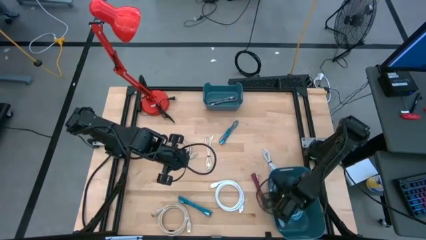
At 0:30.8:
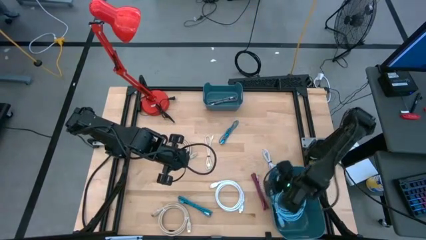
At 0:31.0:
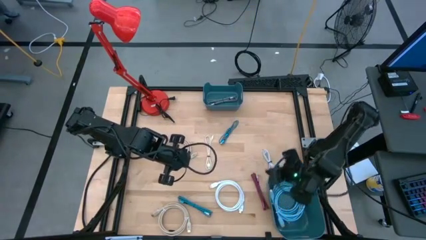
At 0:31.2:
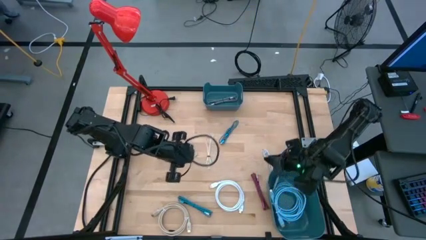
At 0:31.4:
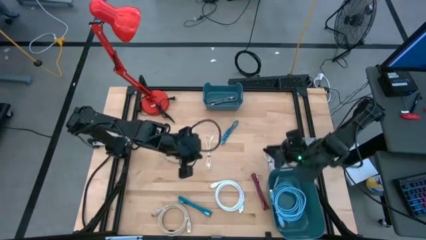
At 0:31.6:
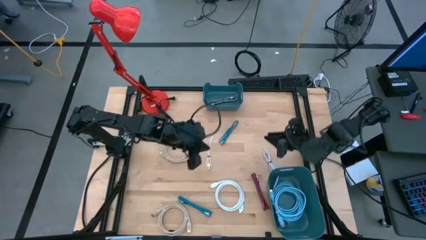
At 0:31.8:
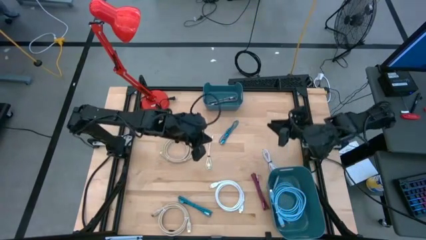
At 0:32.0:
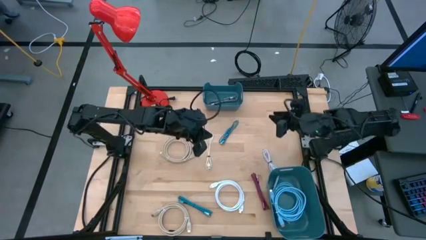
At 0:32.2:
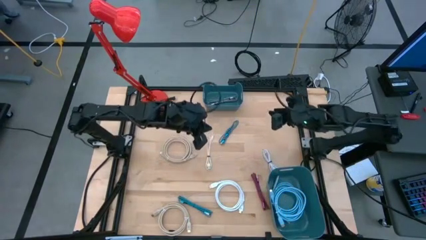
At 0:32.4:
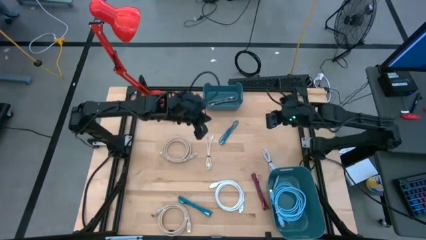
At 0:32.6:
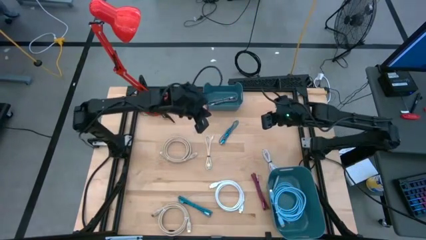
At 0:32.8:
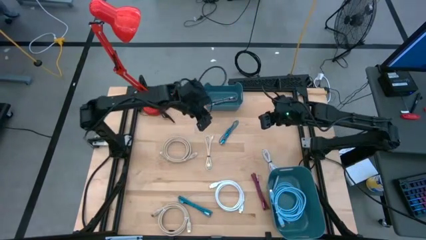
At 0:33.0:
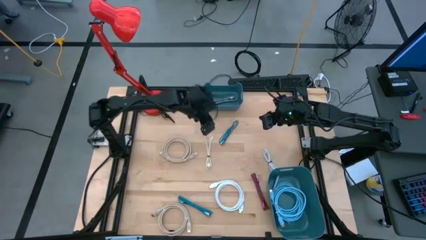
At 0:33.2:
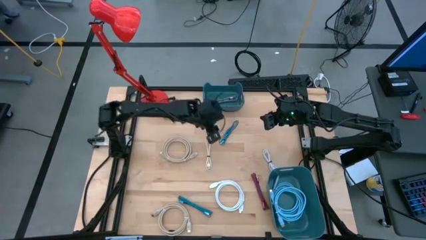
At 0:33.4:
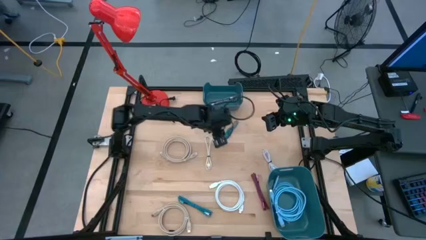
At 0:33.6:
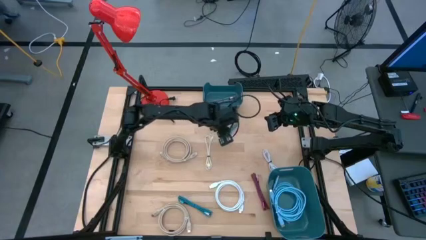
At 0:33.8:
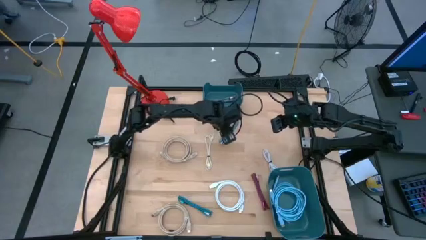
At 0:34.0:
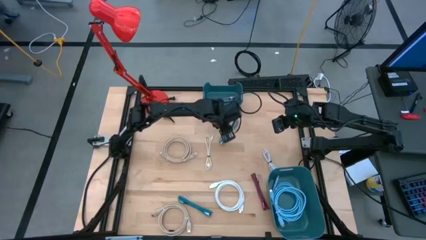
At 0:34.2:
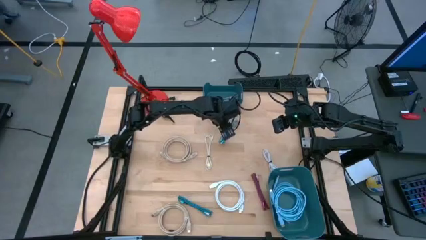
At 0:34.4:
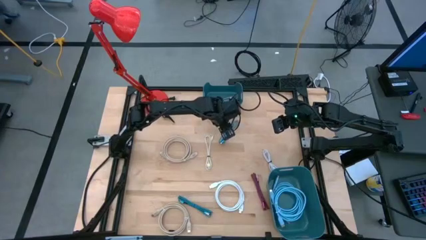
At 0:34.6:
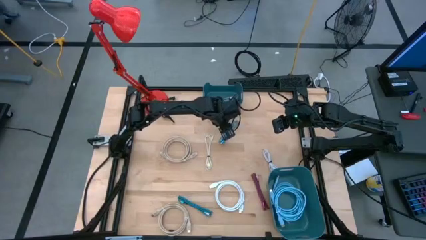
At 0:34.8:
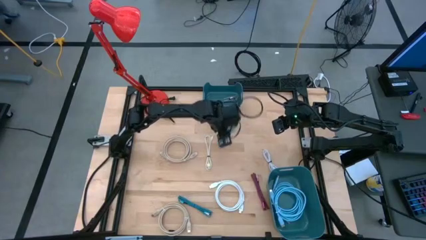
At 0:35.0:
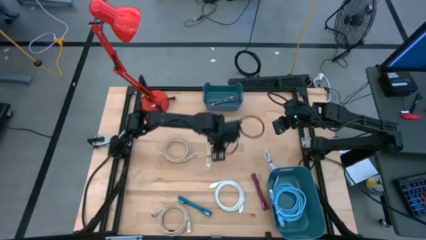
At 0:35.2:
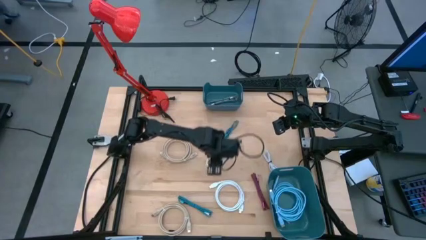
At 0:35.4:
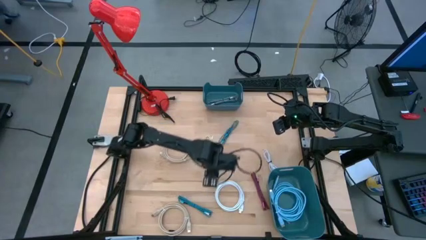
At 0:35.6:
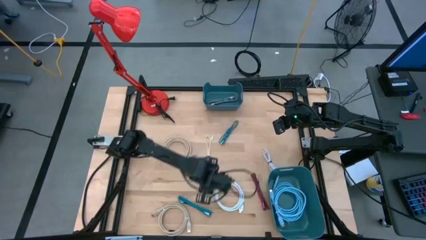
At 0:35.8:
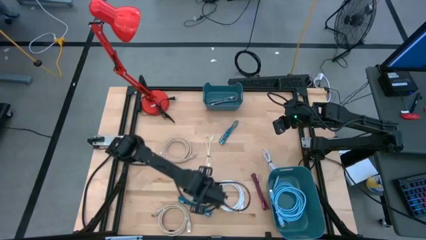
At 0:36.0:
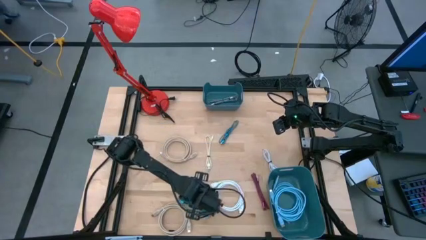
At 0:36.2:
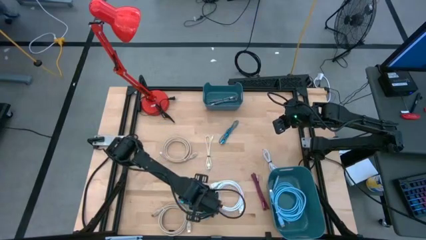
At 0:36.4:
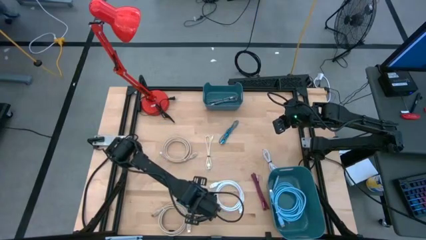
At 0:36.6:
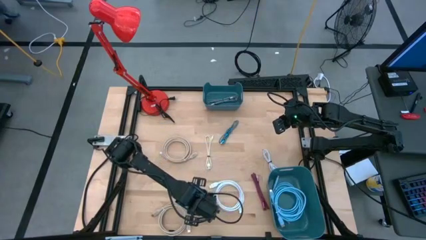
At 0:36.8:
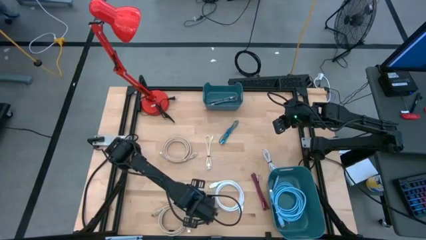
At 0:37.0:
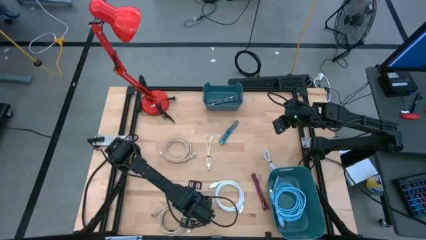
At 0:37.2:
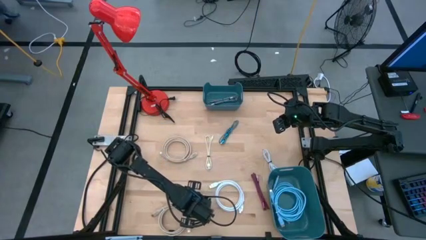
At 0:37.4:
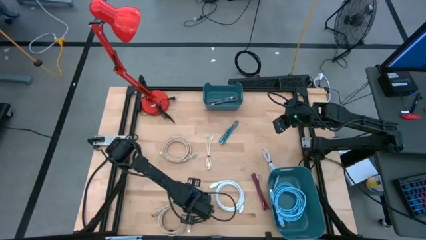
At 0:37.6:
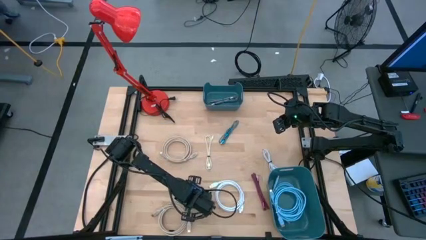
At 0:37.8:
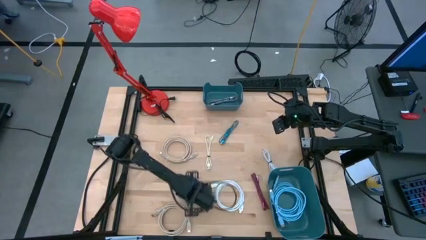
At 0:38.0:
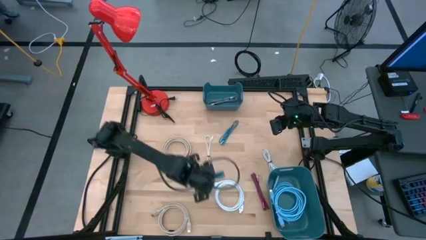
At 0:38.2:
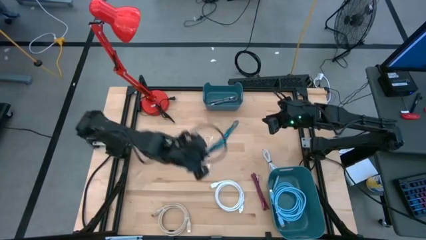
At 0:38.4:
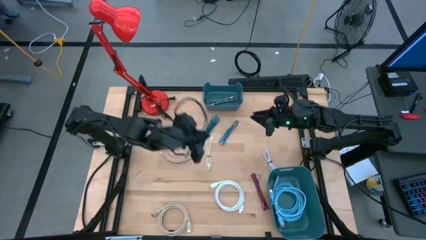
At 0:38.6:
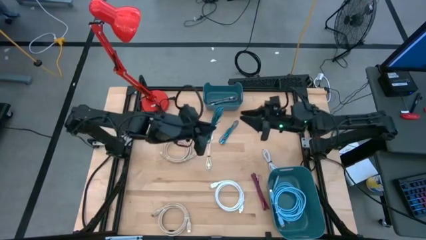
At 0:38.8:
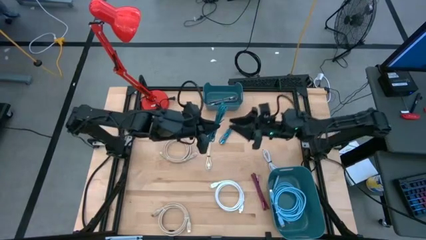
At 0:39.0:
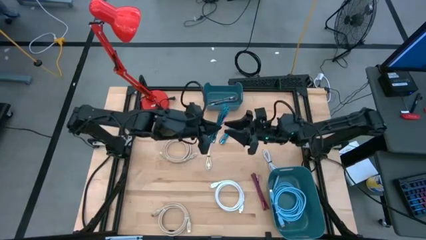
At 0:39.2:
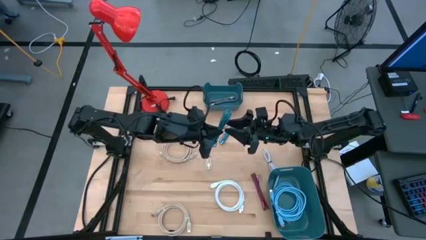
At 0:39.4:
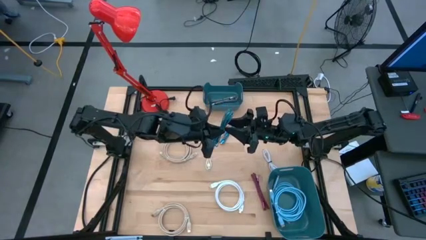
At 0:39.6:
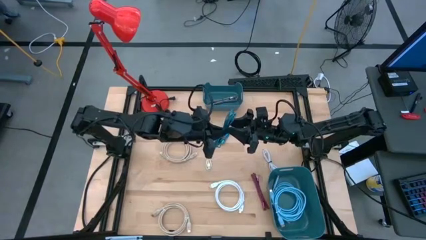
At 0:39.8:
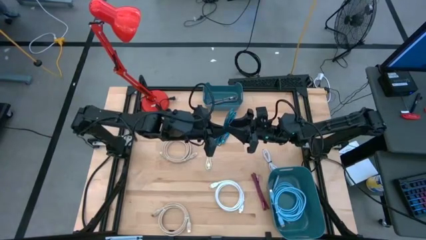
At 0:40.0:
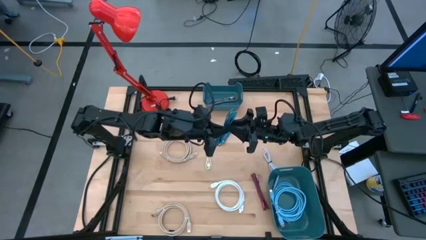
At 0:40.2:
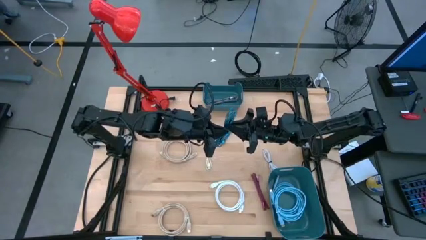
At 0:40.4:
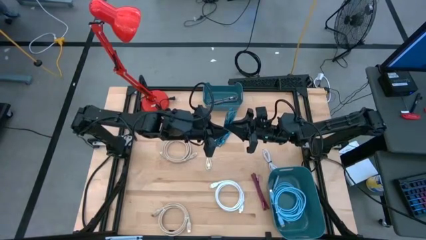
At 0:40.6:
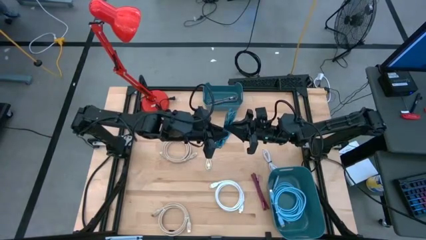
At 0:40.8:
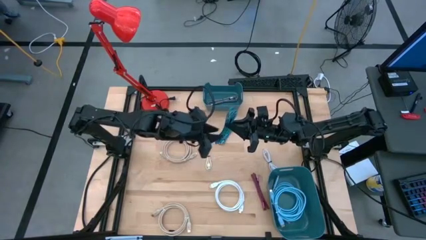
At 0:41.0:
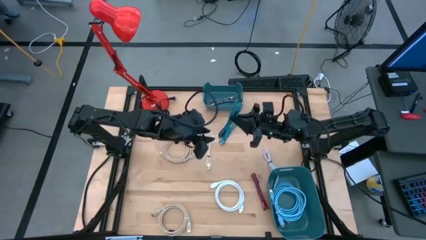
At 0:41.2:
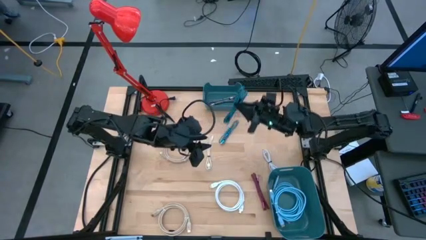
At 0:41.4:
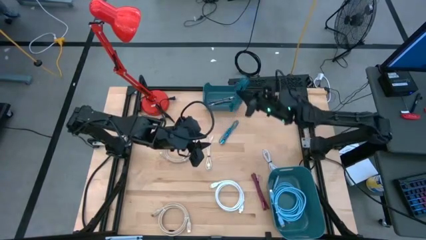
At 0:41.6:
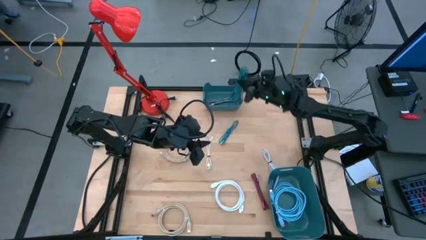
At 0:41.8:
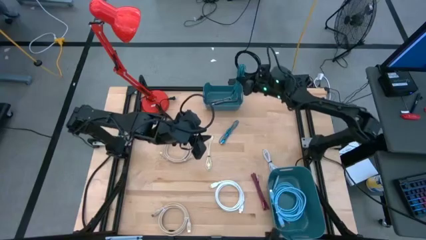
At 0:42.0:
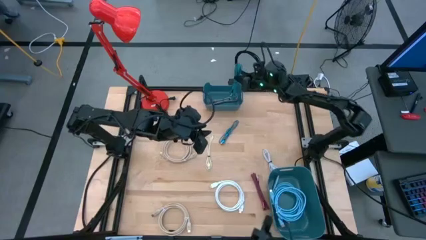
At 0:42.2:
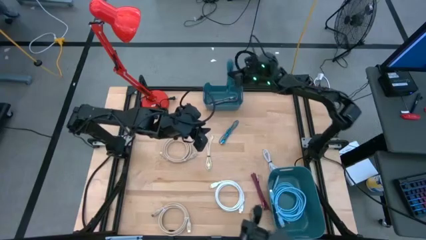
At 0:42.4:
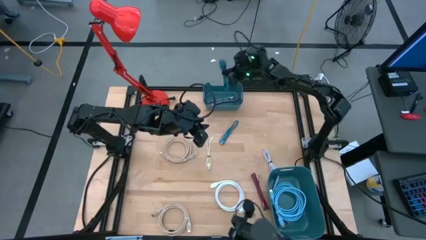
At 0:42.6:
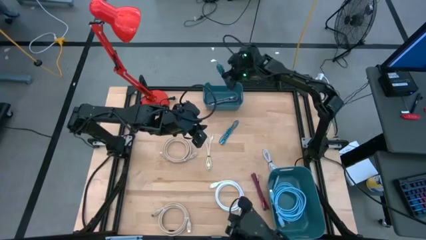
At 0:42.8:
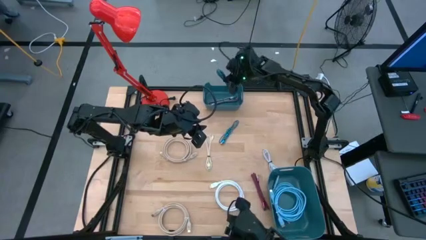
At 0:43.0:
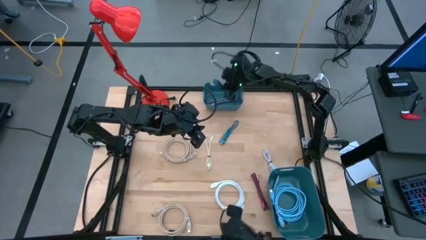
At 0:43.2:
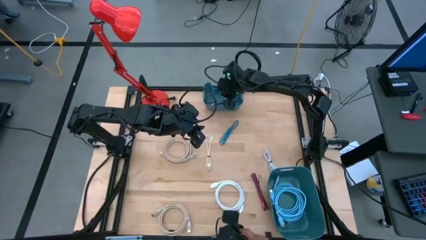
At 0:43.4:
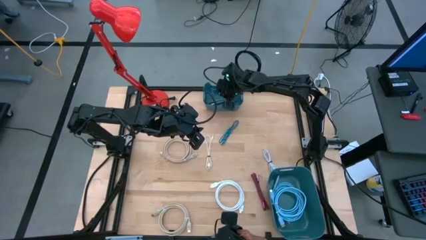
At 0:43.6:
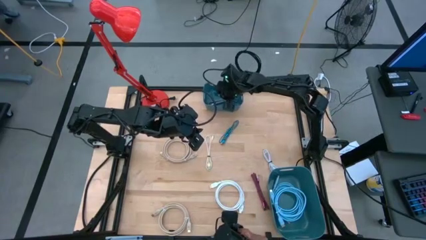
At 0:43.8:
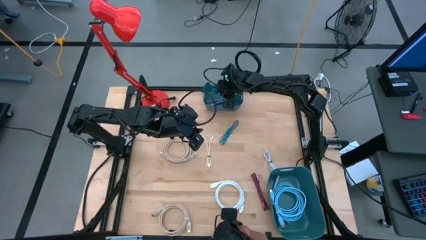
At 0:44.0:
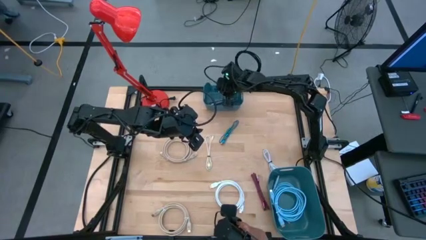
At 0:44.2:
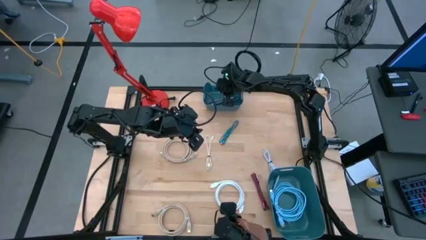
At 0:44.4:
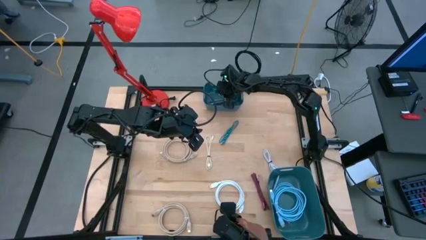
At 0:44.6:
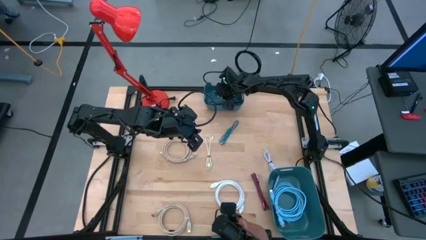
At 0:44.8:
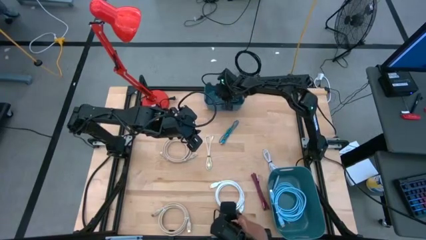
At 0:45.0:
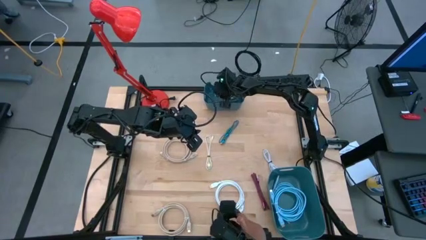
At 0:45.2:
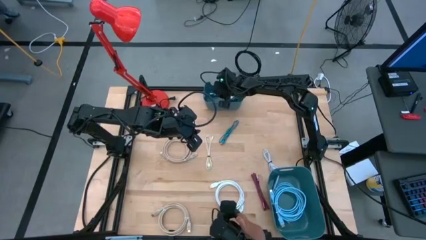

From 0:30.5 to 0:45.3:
Task: Pick & Place USB Port
Put the bottom blue and white charger cable into the top blue bin

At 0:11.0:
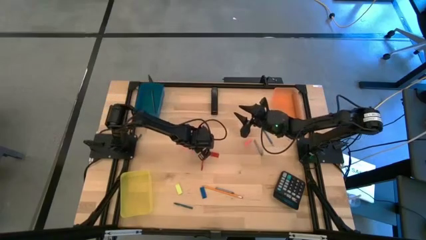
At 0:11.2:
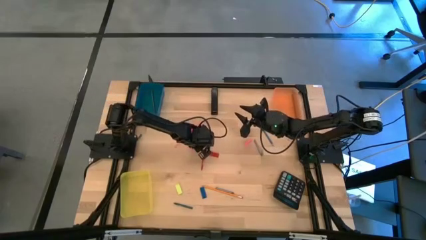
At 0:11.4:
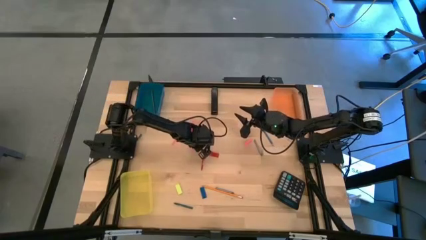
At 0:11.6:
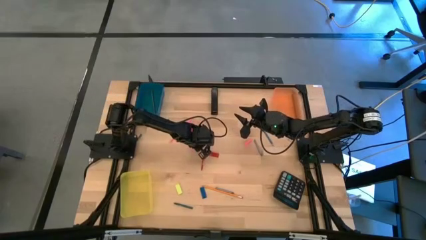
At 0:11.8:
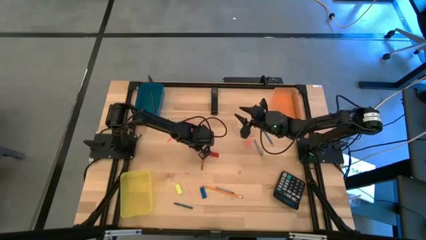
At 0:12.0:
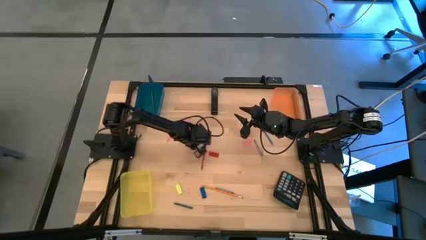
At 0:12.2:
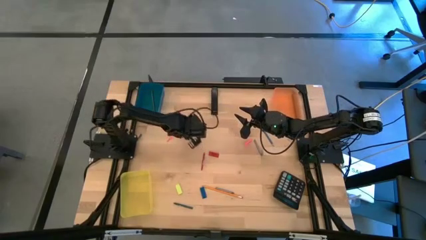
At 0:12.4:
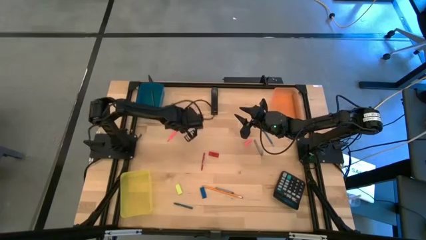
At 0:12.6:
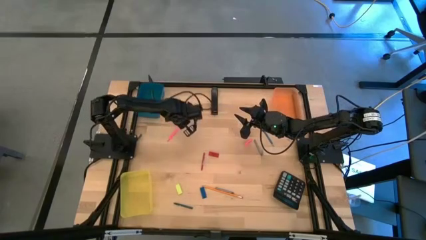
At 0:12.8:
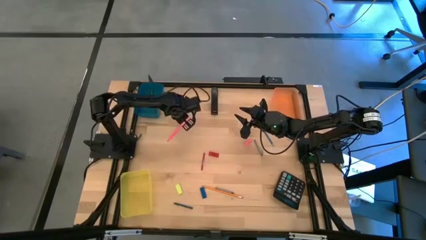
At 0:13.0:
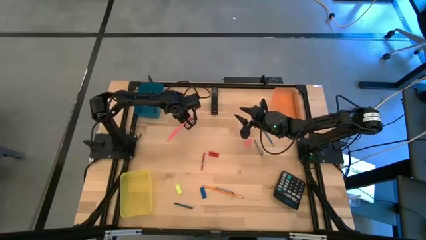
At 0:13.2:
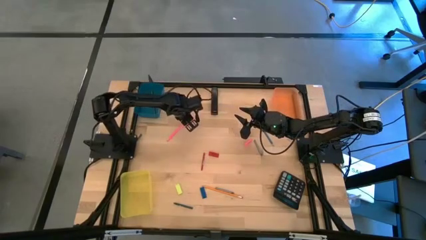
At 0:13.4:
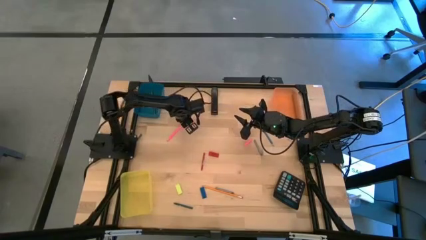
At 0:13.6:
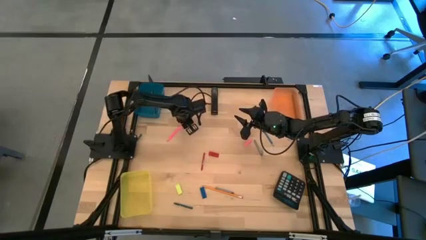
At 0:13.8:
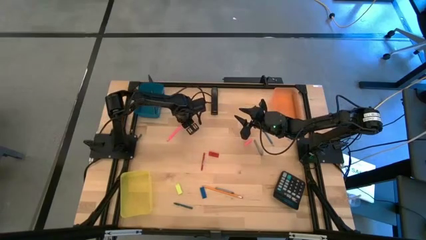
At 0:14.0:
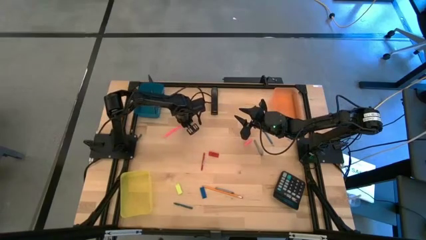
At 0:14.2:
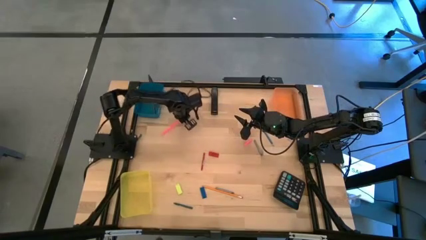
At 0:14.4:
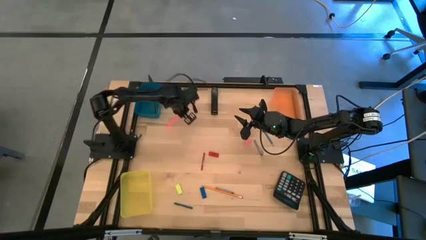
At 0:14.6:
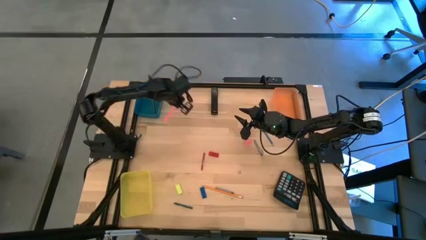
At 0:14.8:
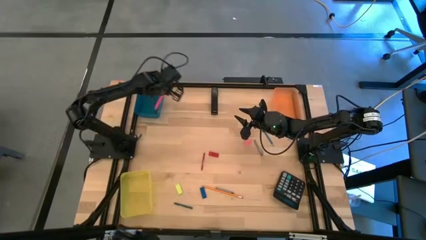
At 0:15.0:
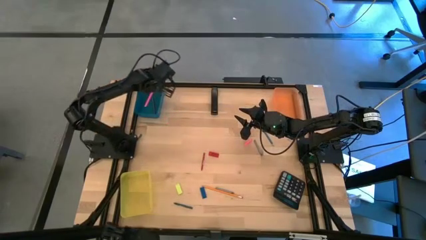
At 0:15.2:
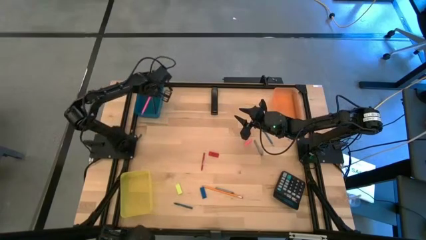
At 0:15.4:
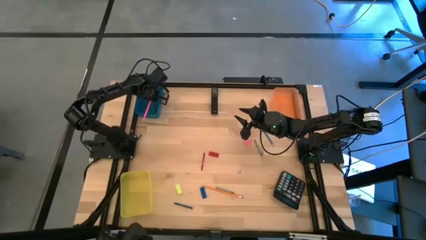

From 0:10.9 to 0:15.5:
Task: Sort crayons/erasers/pens/pencils in bins
Put the pink pencil into the blue bin
